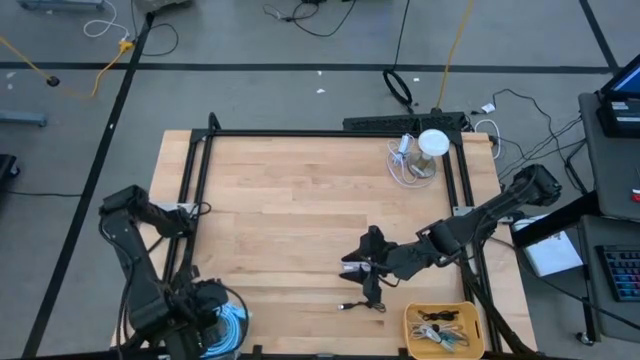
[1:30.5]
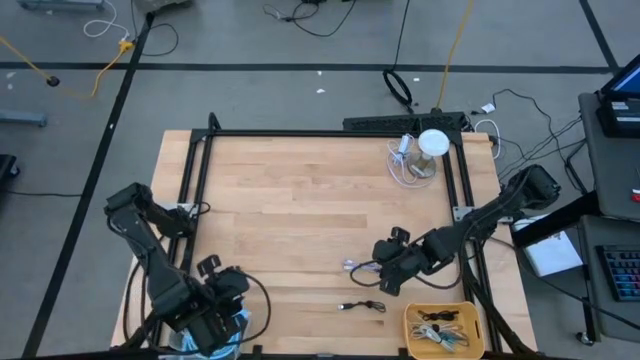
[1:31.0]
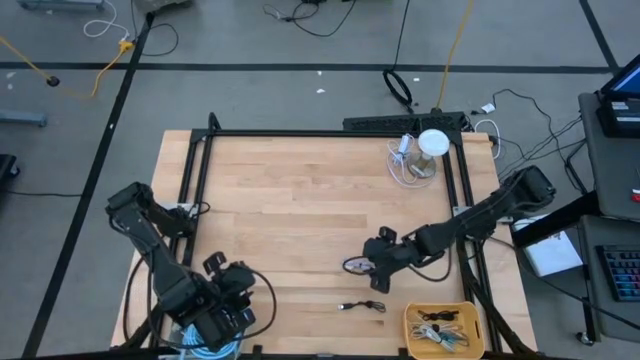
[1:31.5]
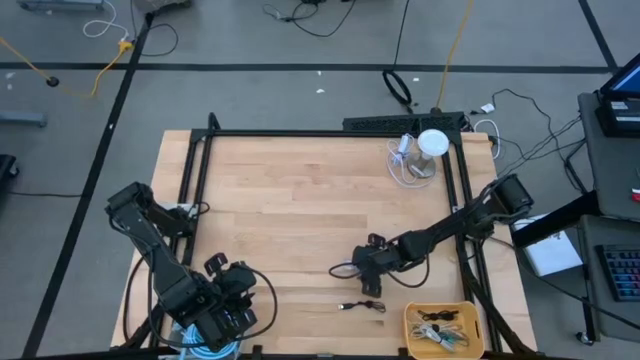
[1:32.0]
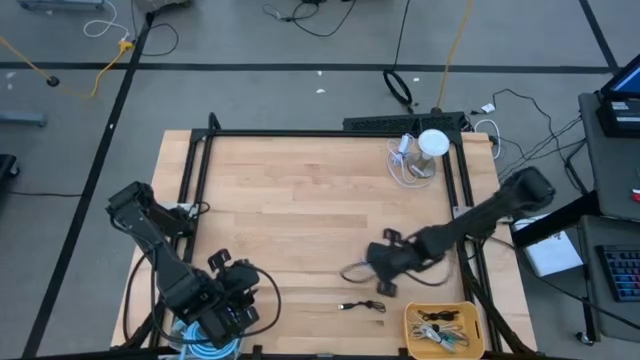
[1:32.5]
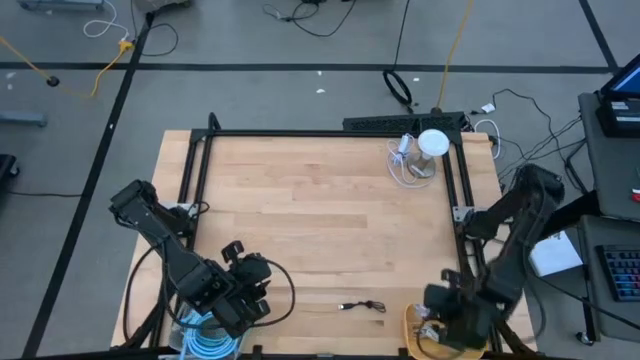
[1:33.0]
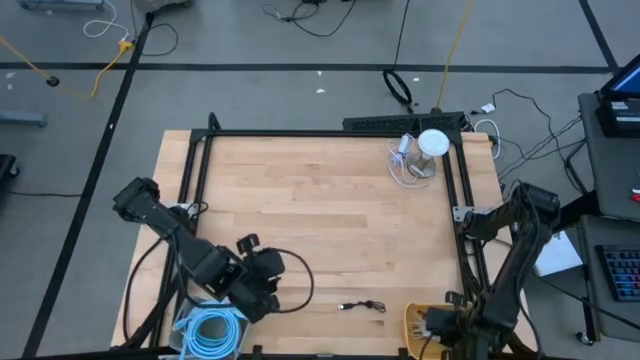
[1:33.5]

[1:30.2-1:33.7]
Task: Pick & Place USB Port
Put the purple charger cable into the yellow bin

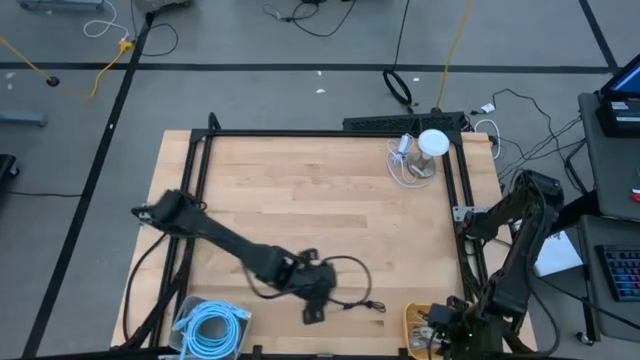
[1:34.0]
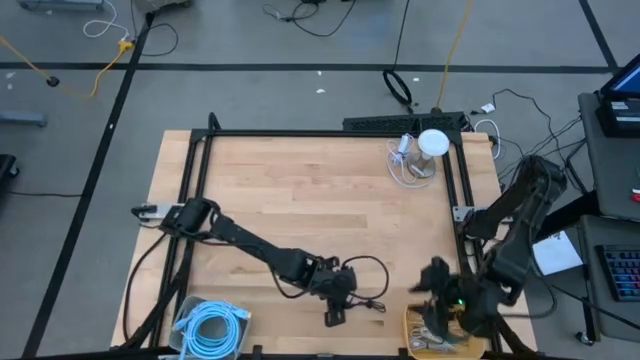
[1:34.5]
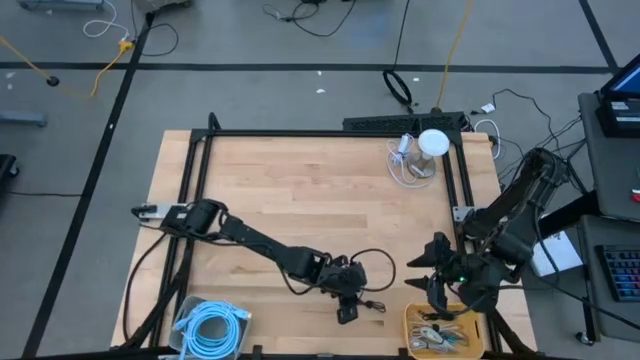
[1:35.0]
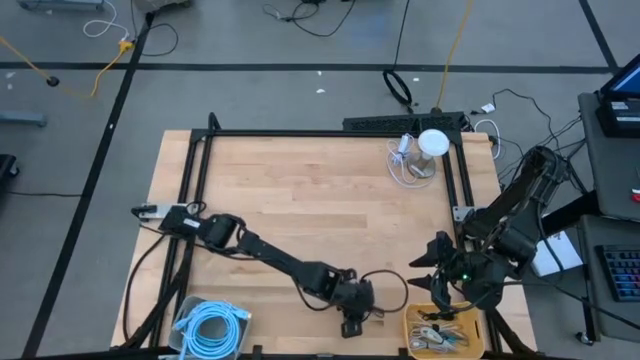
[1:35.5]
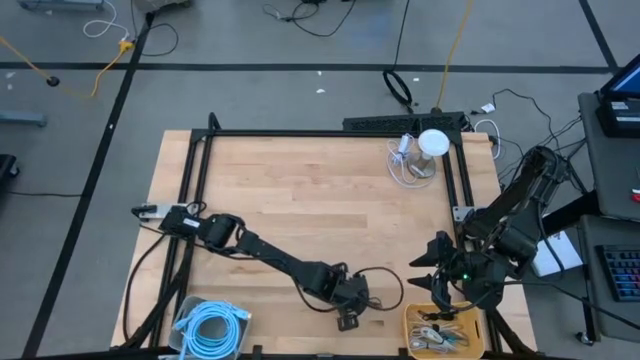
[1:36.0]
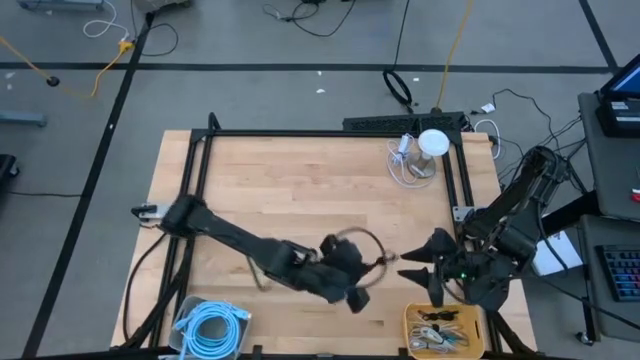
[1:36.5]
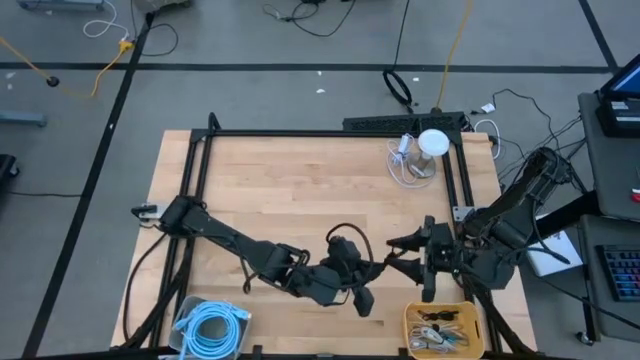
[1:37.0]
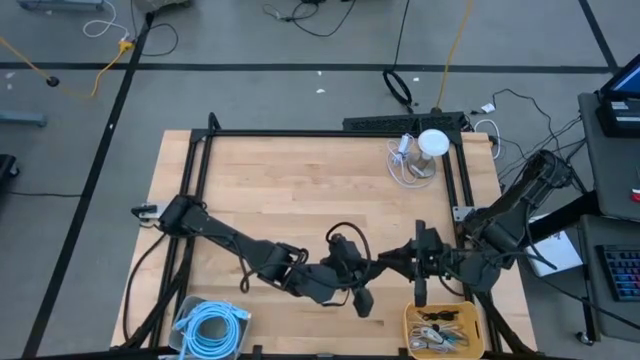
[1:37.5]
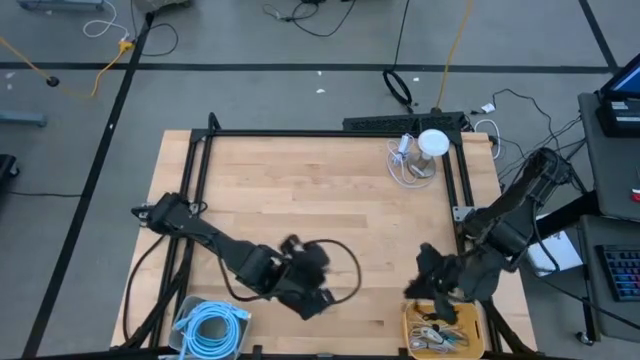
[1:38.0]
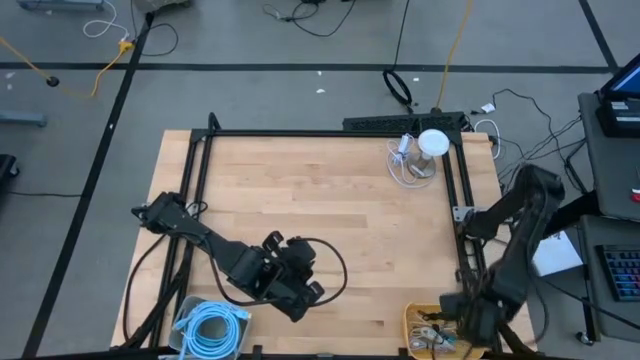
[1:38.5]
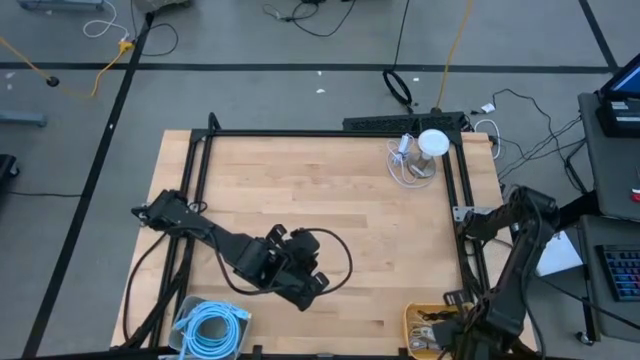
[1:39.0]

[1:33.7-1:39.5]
Put the black charger cable into the yellow bin

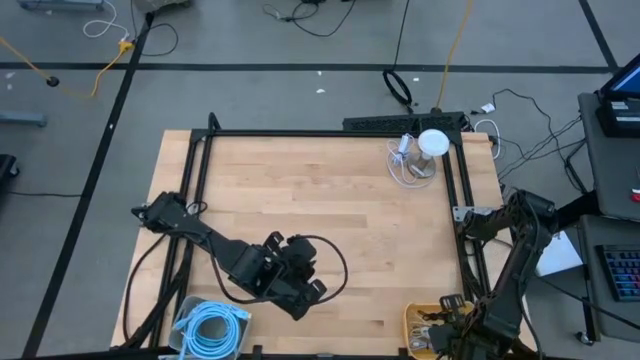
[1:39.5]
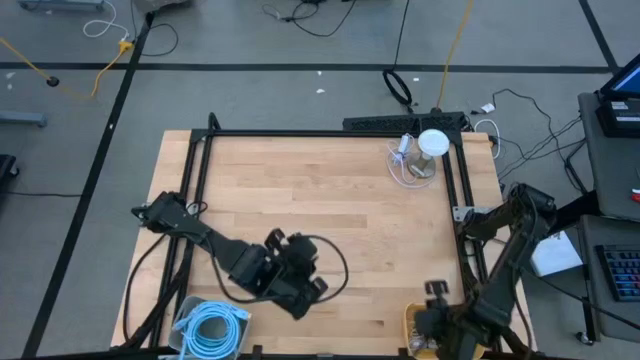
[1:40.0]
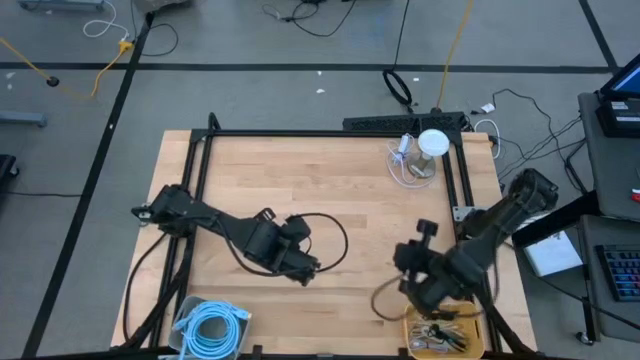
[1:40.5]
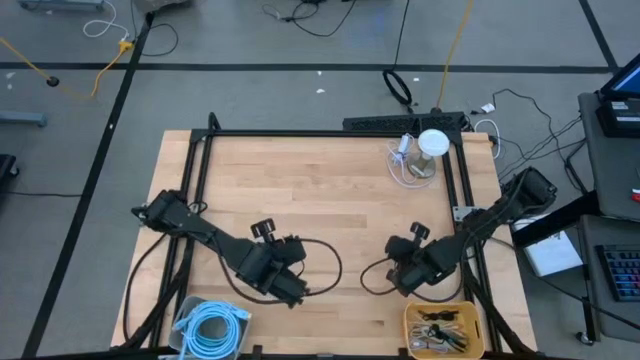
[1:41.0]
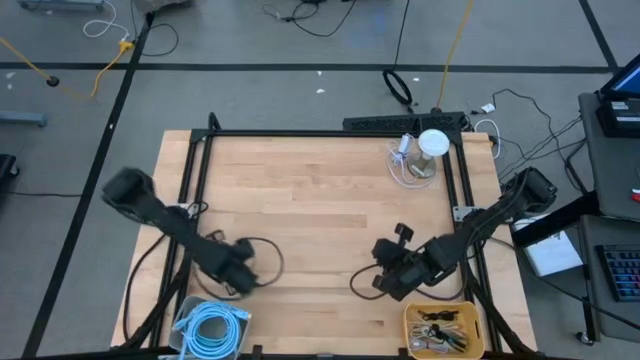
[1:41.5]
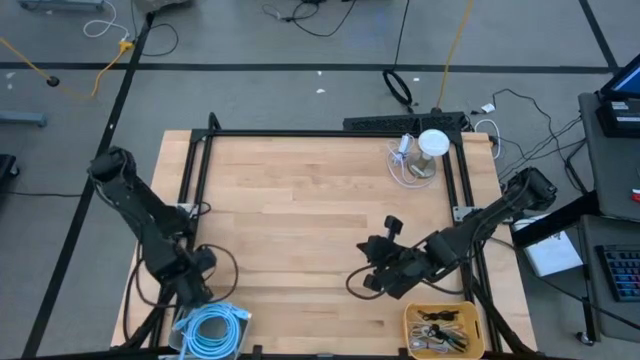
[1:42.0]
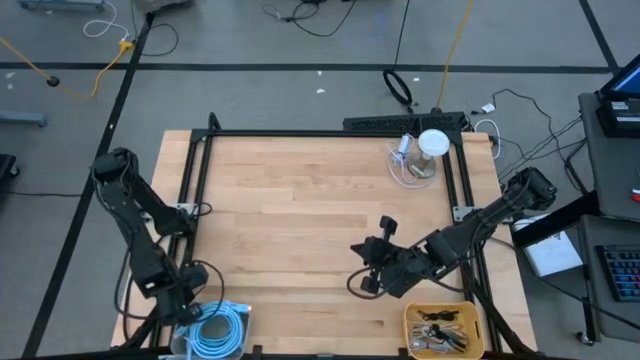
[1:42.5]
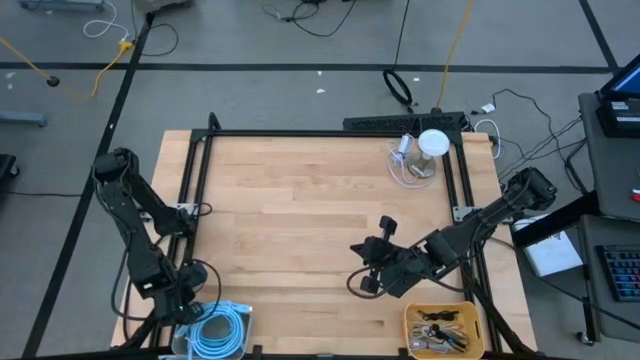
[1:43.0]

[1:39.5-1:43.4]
Adjust the gray bin on the table

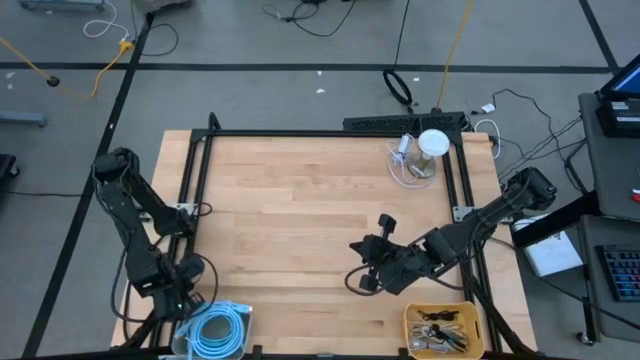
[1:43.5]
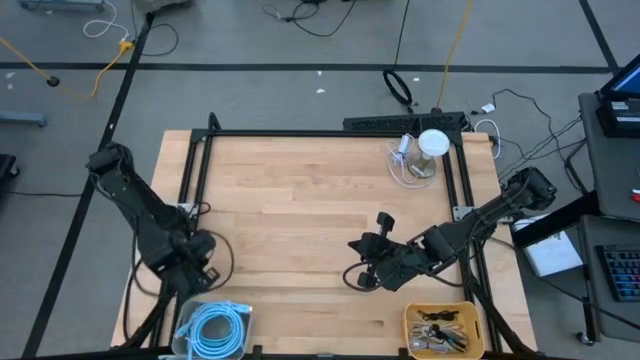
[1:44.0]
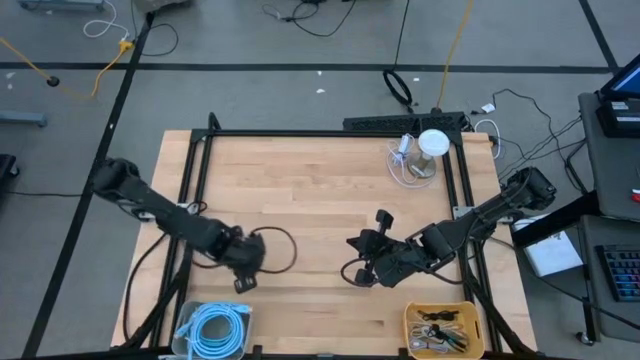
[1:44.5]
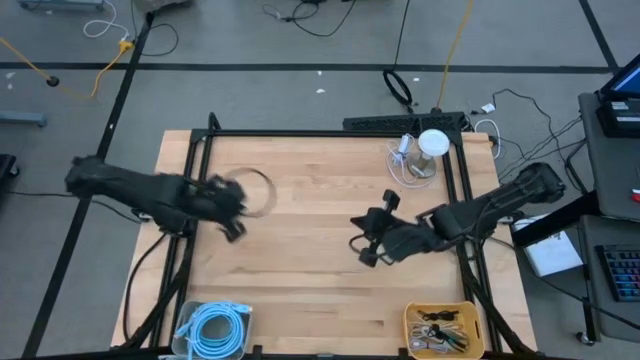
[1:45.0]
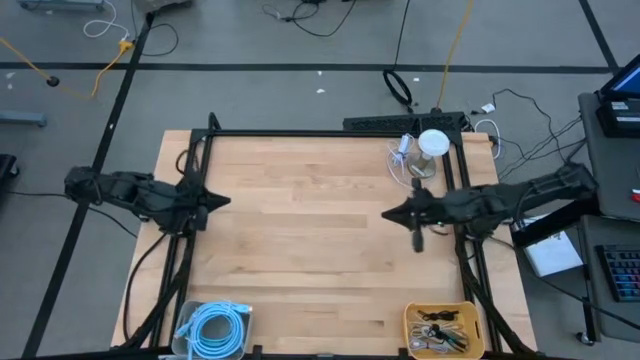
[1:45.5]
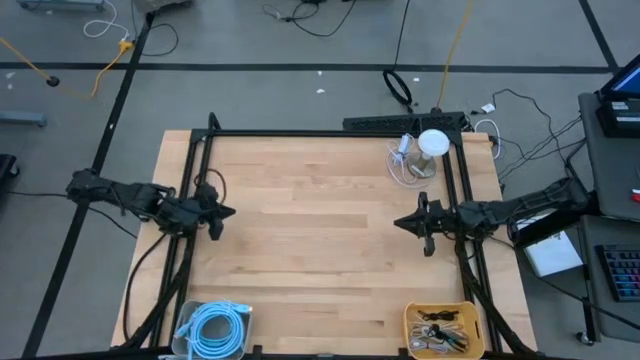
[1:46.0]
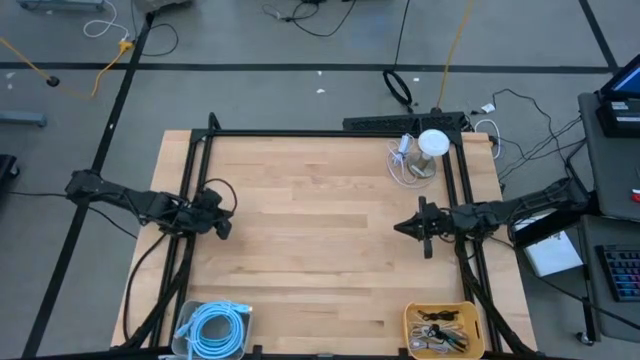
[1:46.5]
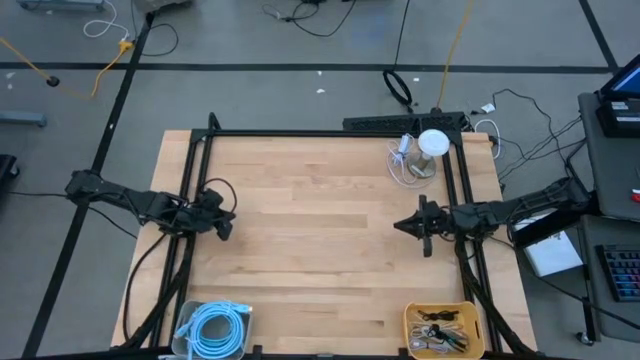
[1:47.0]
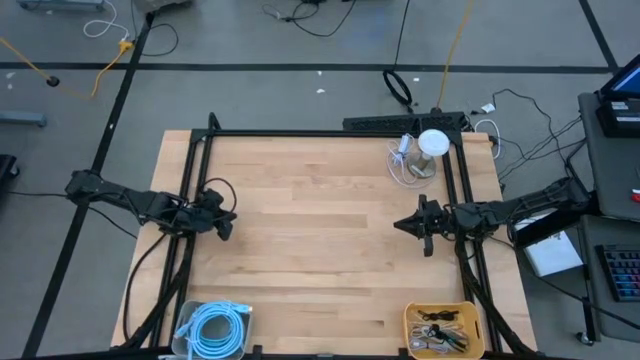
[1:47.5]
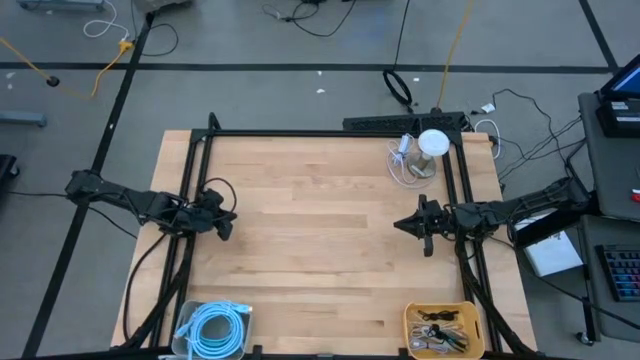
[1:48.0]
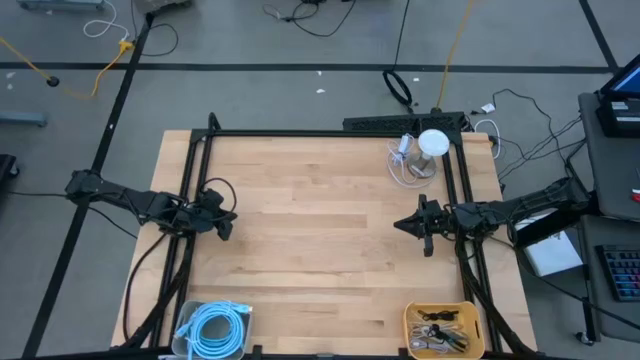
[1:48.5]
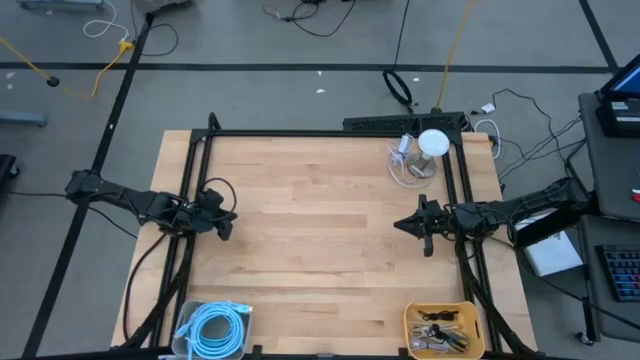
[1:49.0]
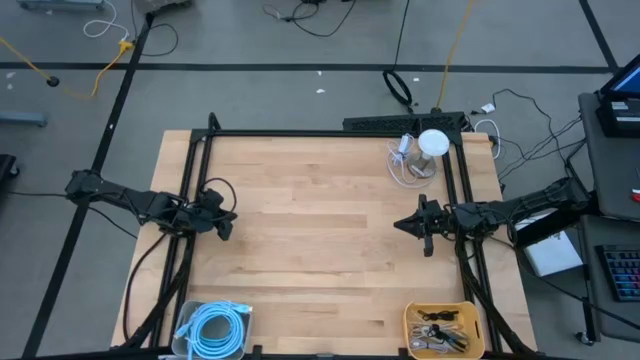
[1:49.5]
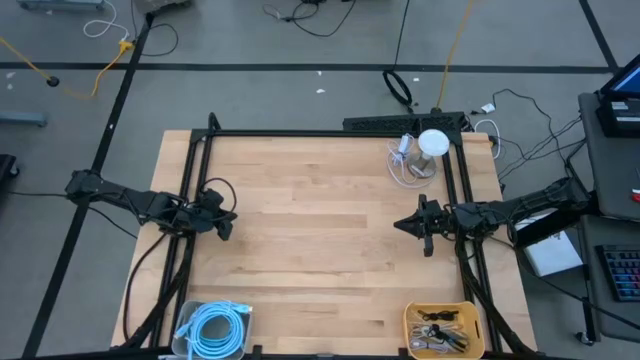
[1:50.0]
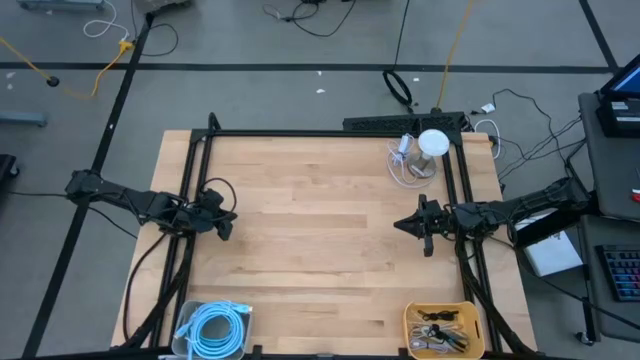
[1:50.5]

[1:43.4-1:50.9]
Return to Home Position
